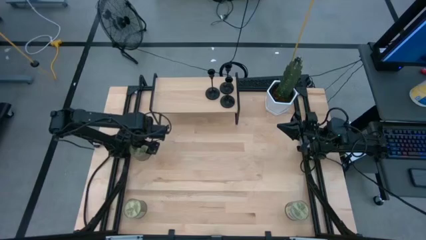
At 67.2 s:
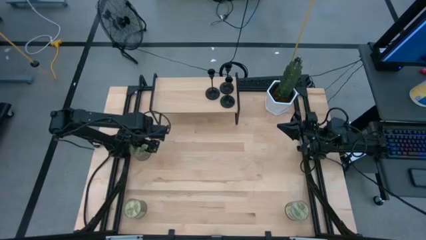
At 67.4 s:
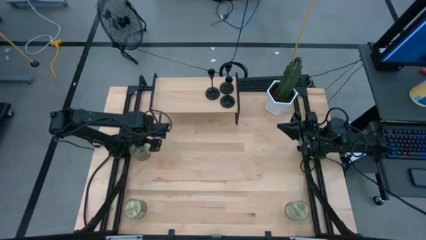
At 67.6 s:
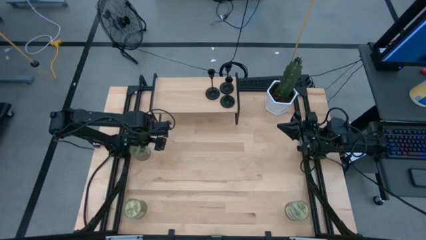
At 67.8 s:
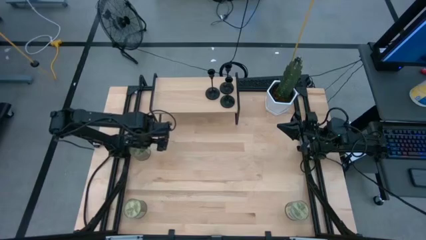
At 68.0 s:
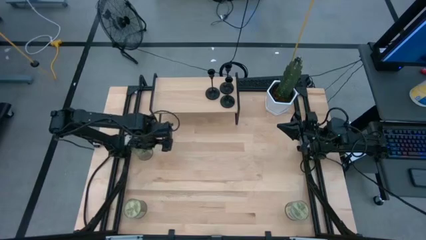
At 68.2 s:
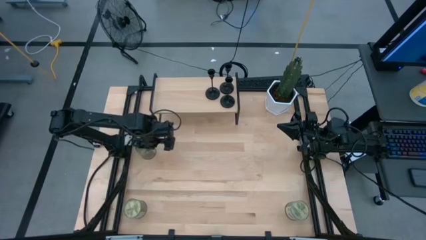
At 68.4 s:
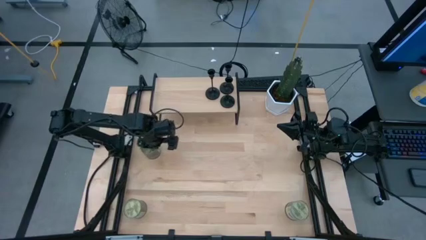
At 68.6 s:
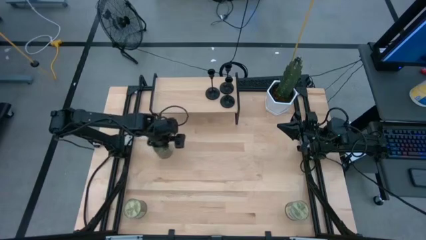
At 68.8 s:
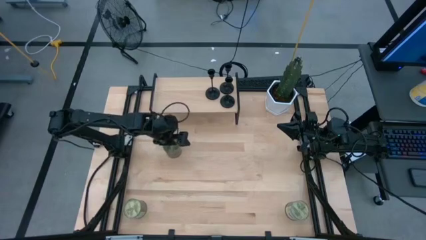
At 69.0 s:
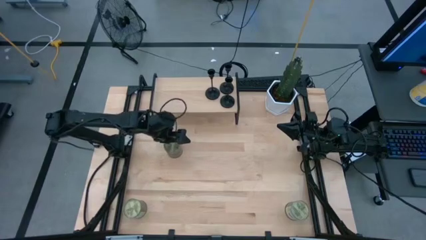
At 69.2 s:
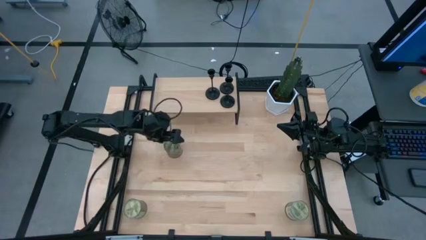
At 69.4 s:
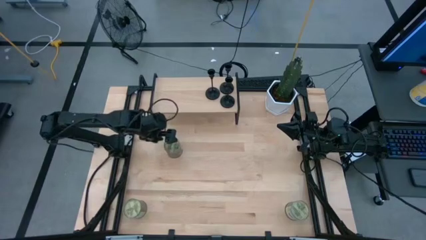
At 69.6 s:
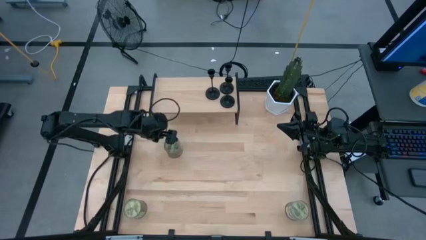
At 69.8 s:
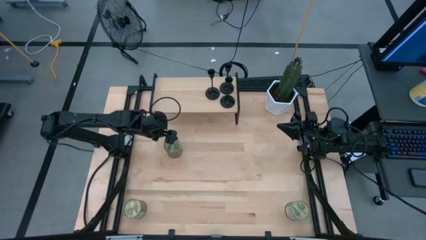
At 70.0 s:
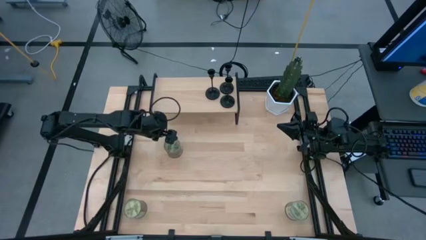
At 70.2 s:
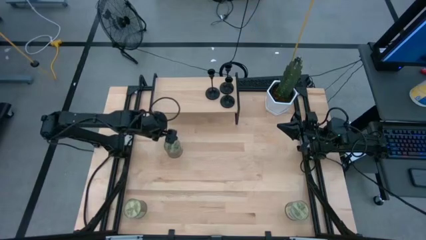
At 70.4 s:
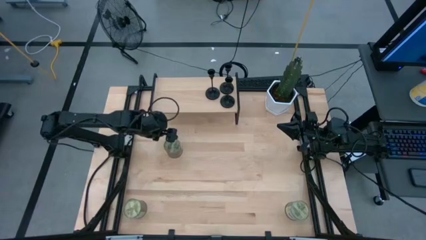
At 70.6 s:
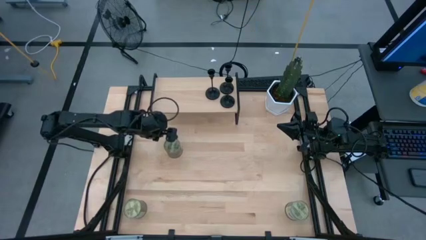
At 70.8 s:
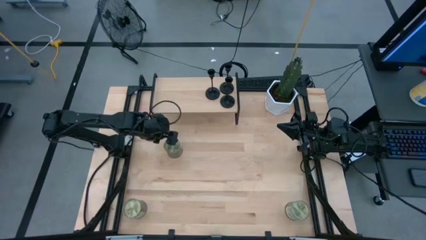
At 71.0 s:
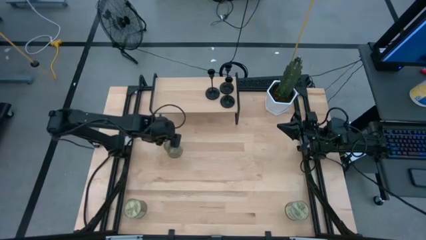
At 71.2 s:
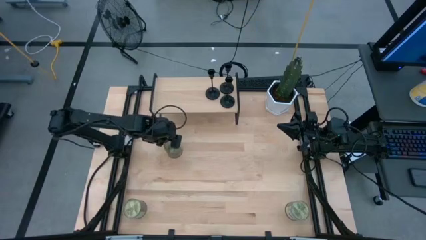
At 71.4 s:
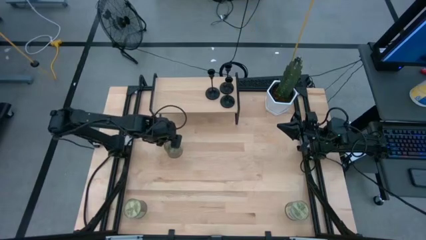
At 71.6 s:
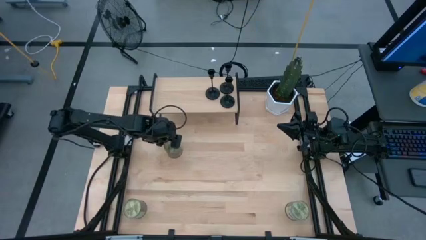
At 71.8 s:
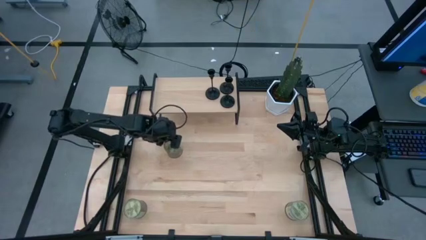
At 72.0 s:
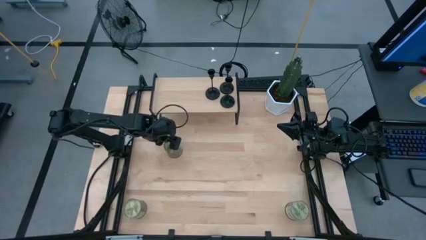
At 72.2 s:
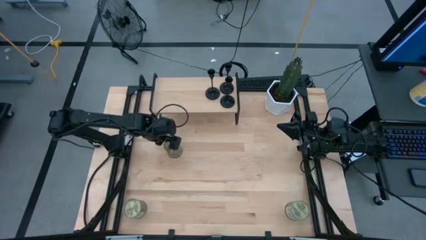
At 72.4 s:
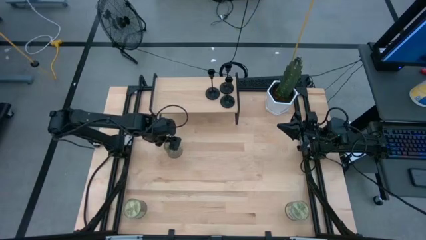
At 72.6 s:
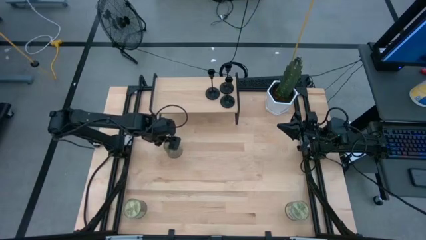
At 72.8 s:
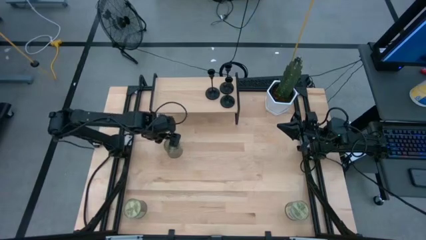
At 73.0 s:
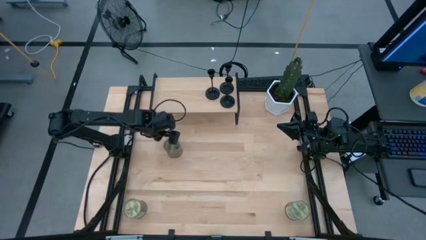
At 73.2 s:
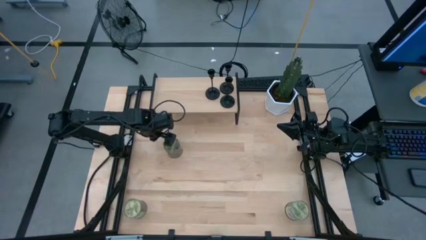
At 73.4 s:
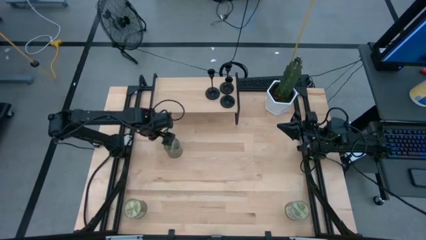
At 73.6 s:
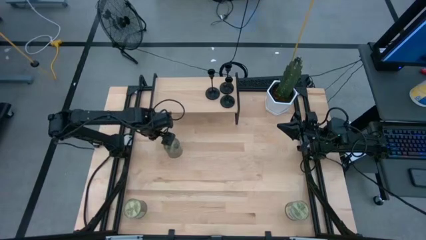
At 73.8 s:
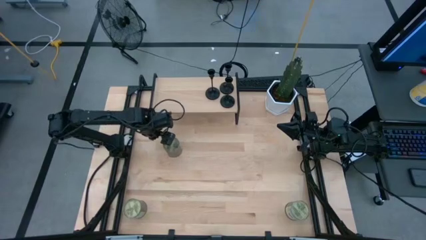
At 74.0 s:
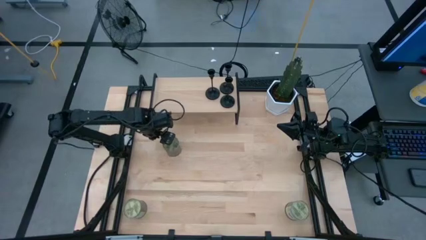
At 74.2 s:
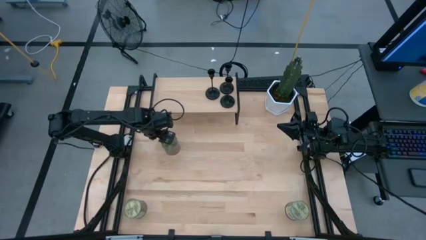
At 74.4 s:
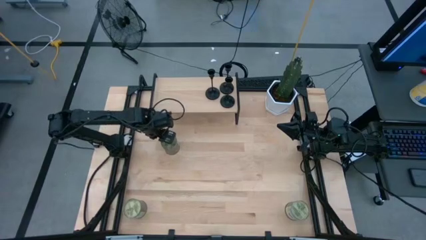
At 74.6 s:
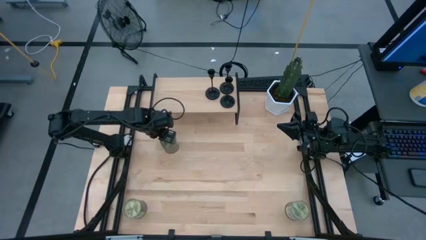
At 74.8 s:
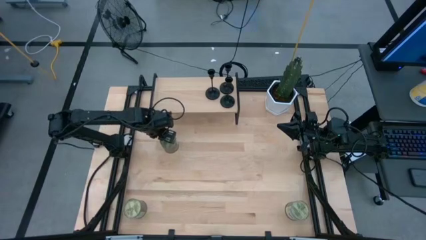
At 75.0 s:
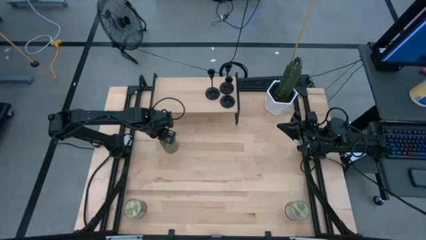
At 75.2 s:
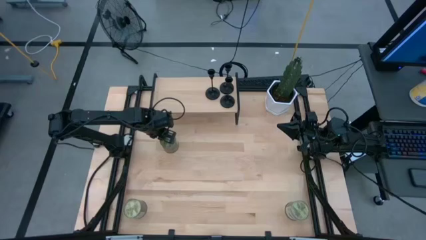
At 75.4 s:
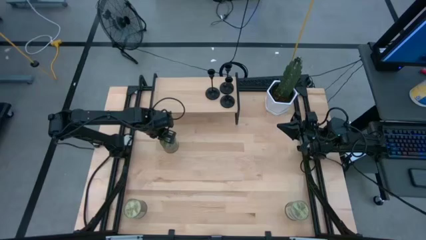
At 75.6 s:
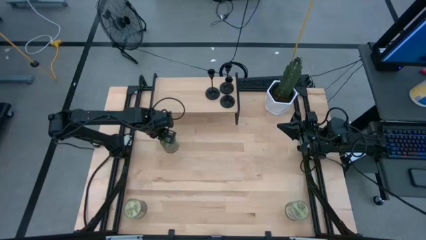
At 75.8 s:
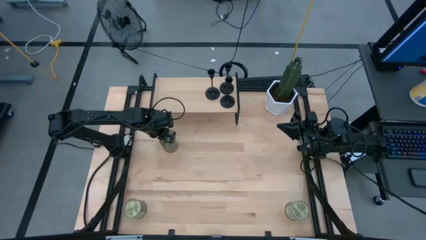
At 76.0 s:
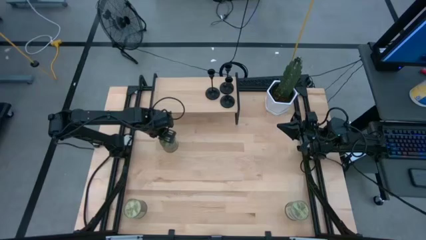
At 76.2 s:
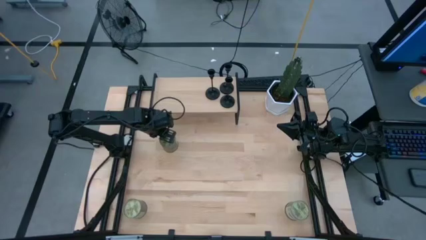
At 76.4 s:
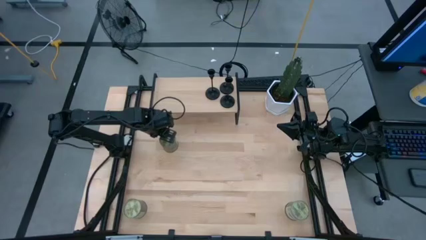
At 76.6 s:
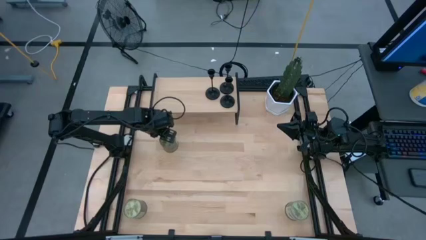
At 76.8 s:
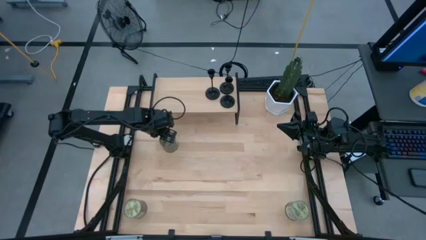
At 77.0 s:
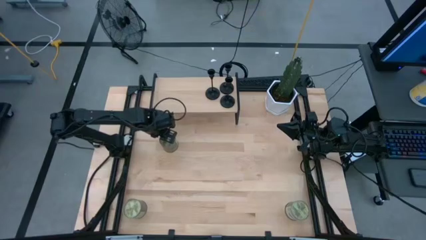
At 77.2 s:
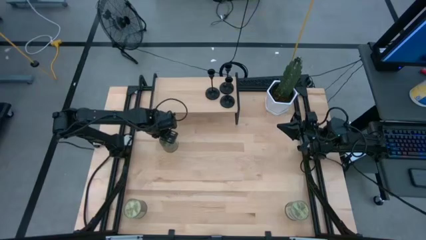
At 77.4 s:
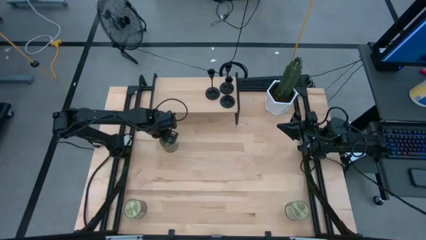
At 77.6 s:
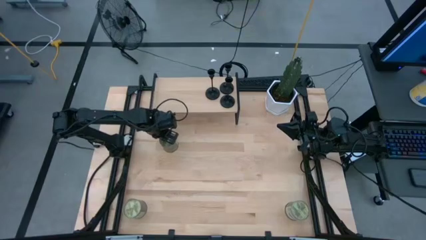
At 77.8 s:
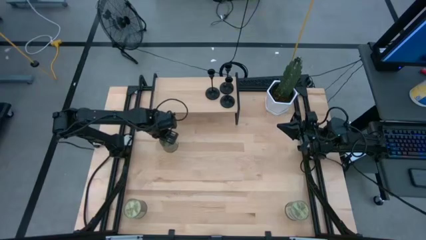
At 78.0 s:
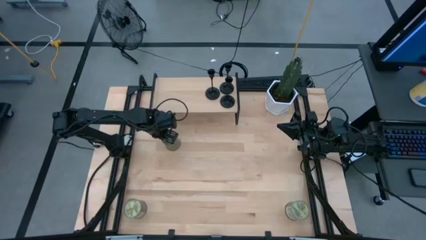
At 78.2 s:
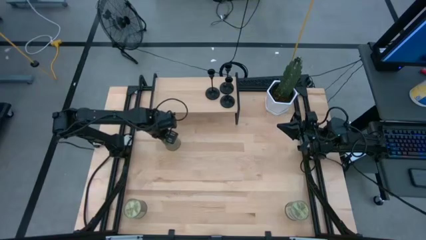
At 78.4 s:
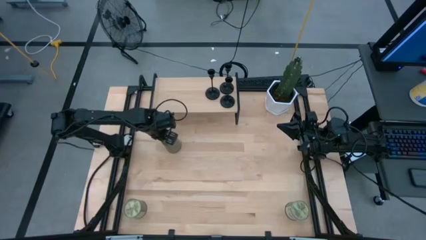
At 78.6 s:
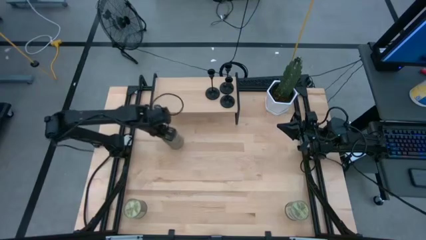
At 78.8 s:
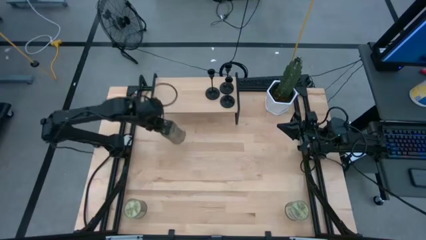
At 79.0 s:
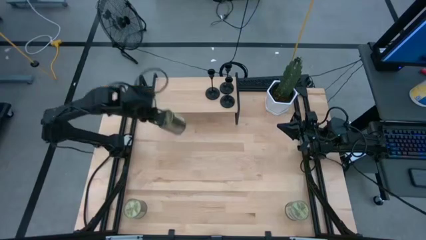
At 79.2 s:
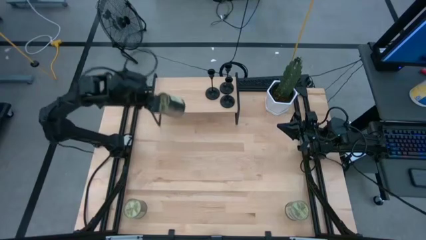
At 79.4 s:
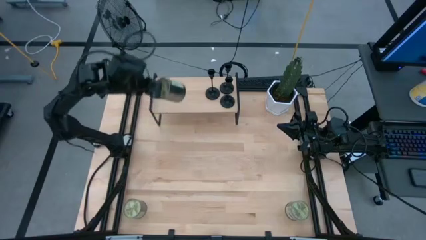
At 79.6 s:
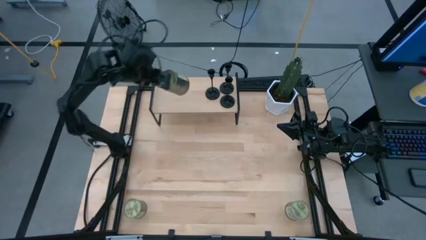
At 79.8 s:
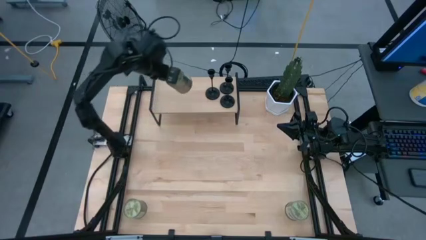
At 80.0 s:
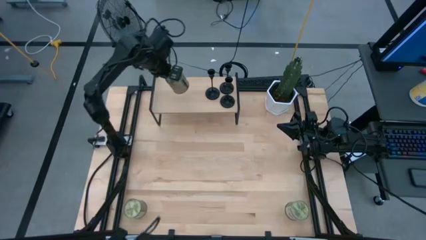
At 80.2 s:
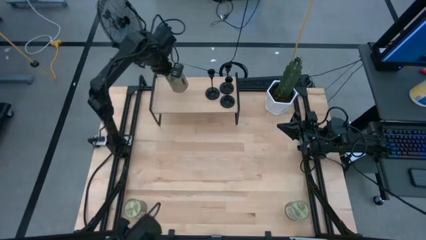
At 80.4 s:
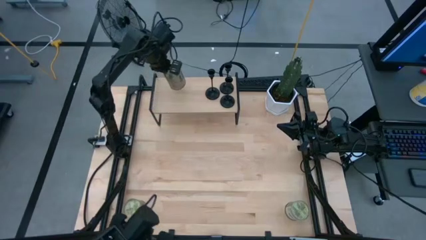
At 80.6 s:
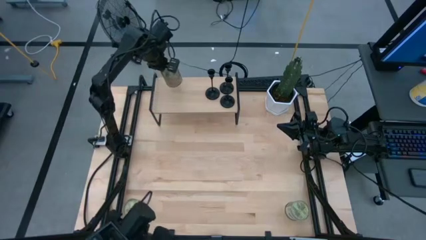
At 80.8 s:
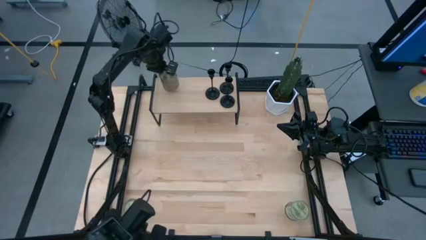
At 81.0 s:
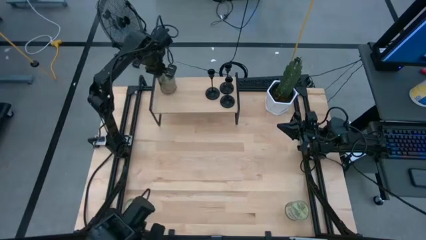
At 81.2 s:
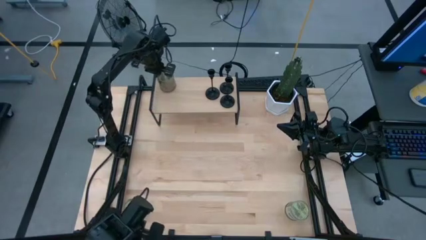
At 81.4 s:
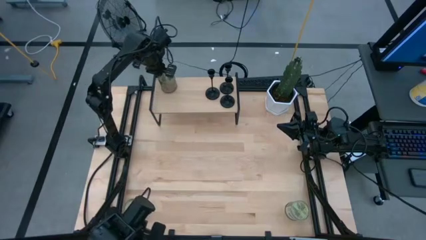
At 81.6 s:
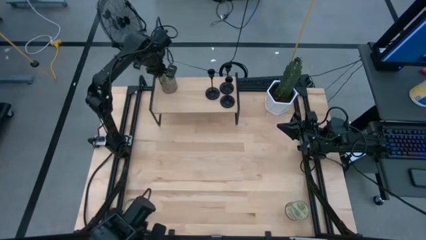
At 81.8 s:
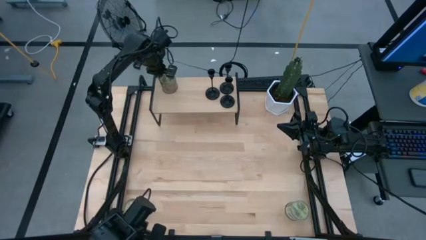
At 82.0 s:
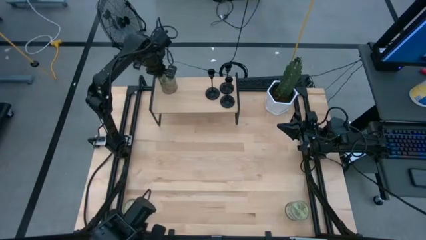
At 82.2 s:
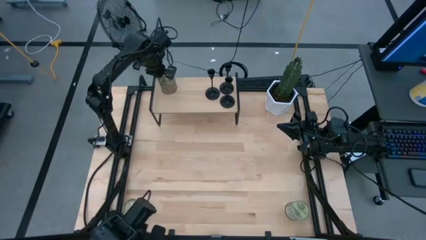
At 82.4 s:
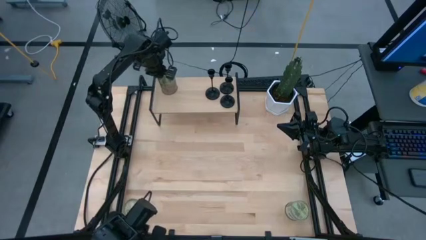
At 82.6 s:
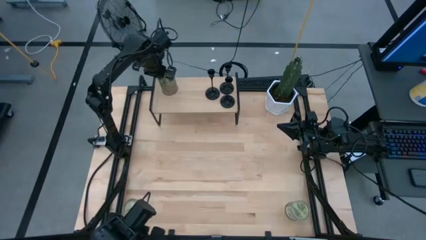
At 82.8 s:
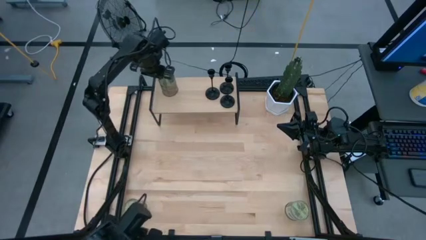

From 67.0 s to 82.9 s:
Task: Pick & Place candle stick holders
Put the top silver scented candle can on the shelf
